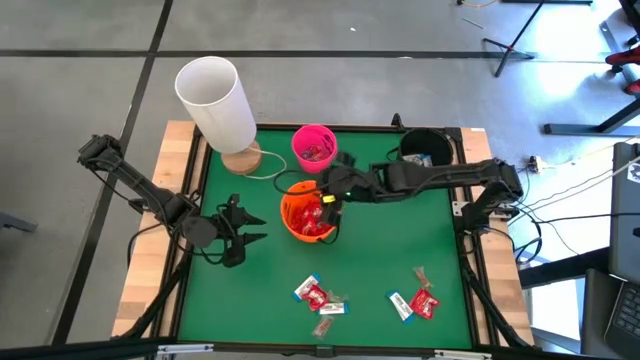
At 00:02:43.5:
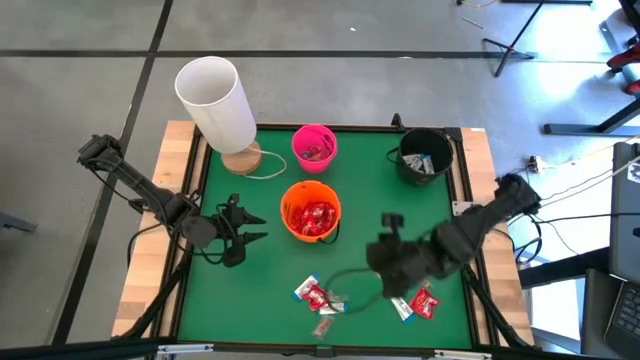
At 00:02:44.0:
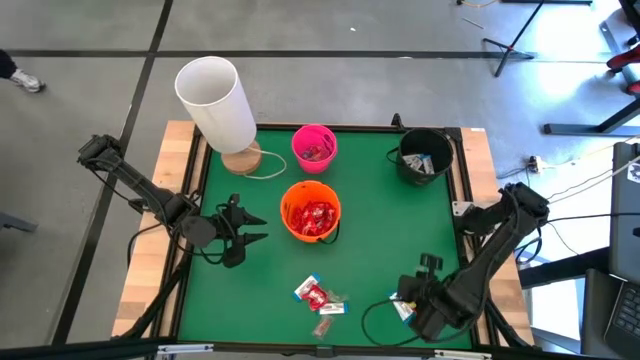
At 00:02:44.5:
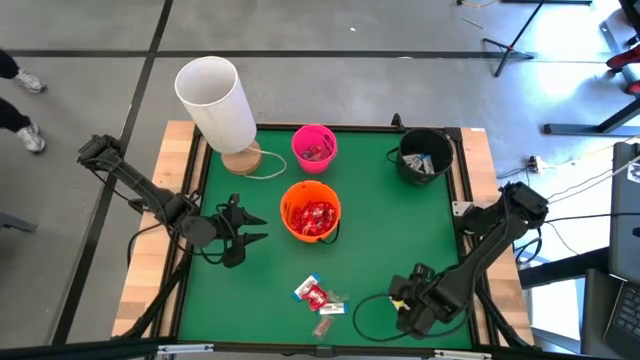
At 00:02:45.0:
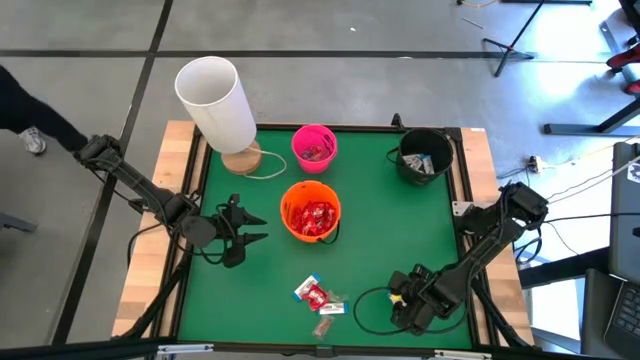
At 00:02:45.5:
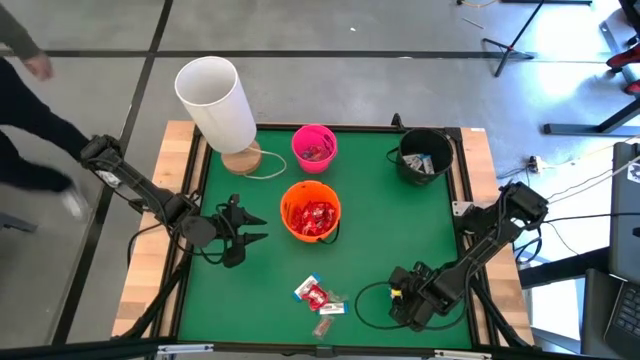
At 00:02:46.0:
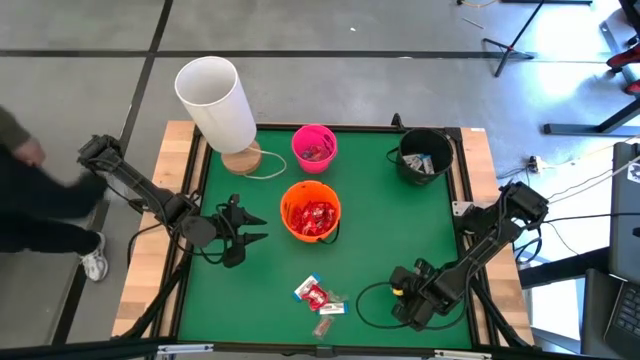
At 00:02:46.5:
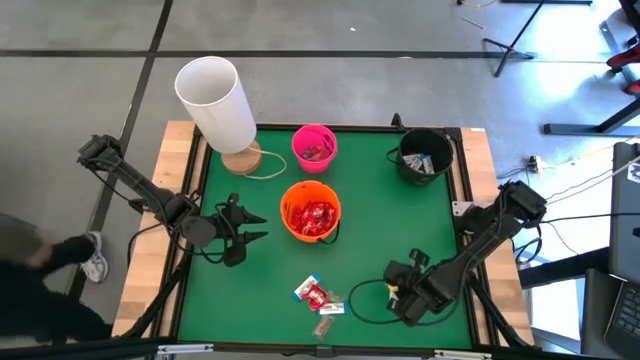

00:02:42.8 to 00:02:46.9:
Task: Sort candy
Put the white candy into the black bucket

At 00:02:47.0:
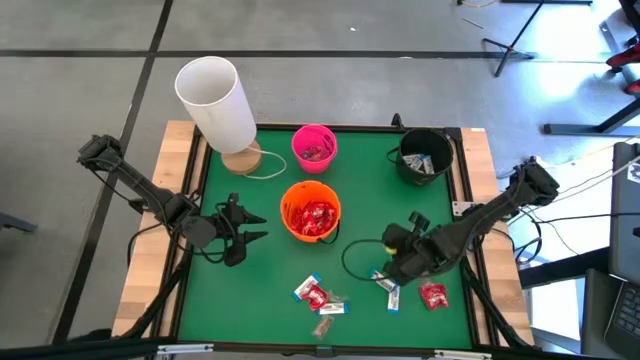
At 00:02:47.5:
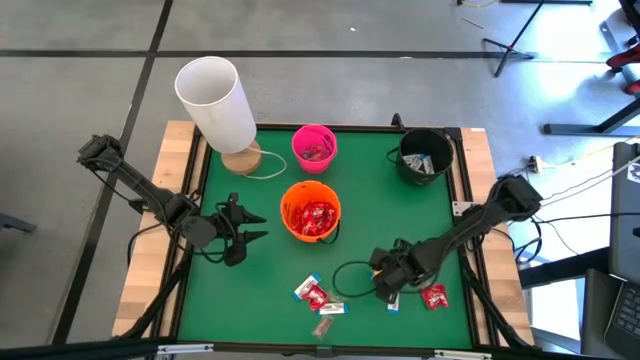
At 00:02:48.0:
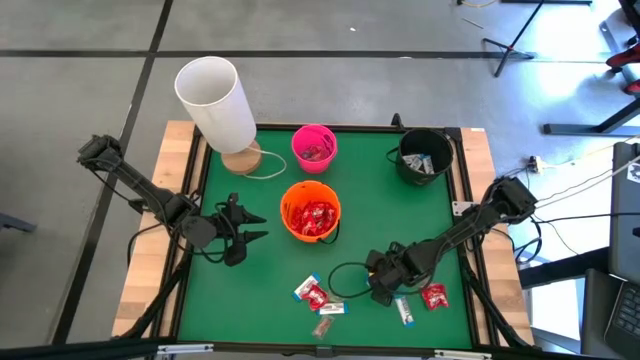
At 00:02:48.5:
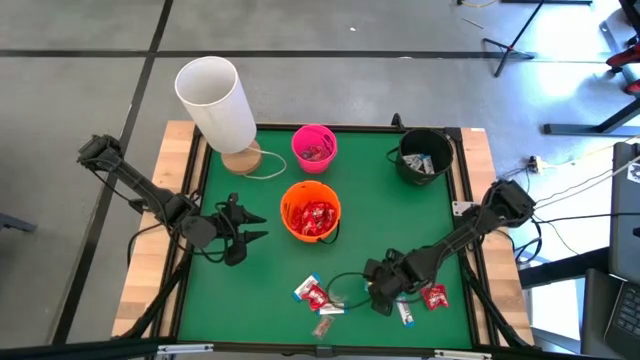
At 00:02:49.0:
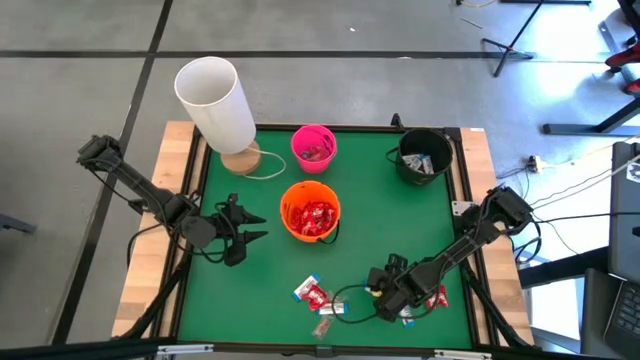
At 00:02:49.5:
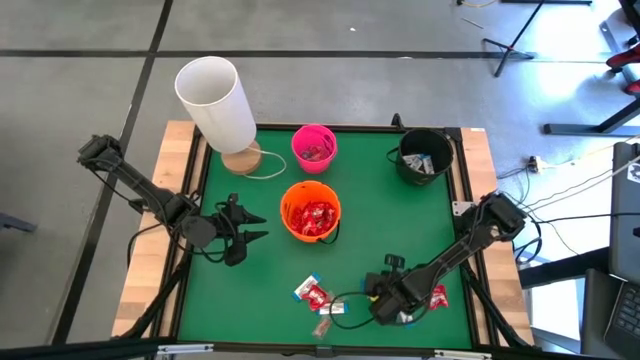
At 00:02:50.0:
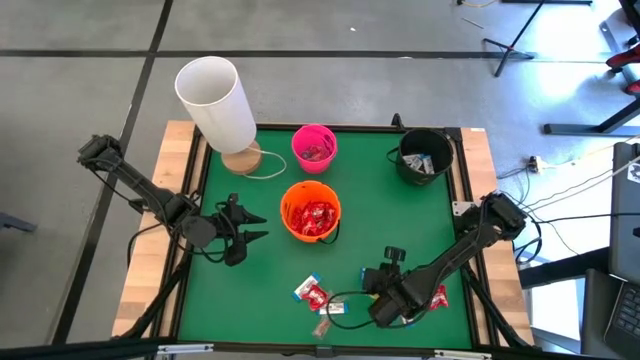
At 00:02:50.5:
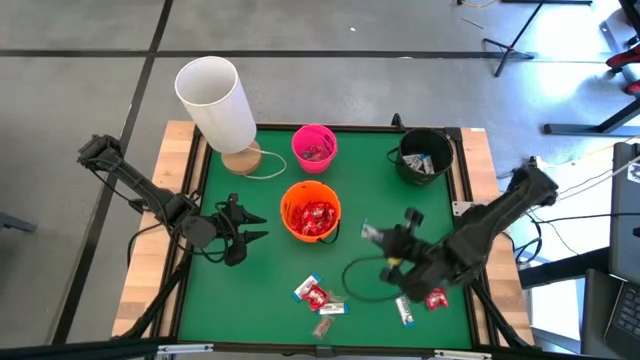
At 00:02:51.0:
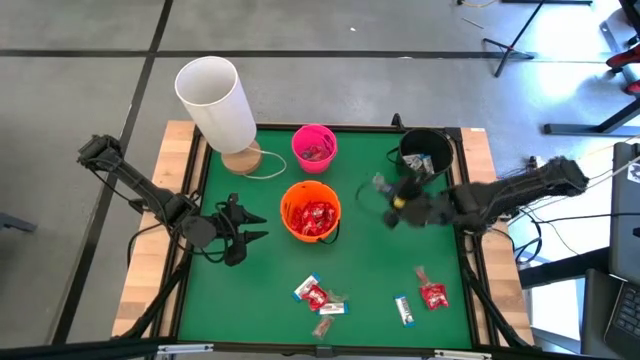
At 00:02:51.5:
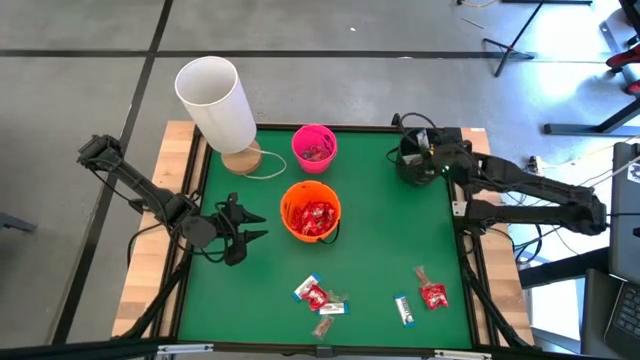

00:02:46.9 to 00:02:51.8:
Put the white candy into the black bucket

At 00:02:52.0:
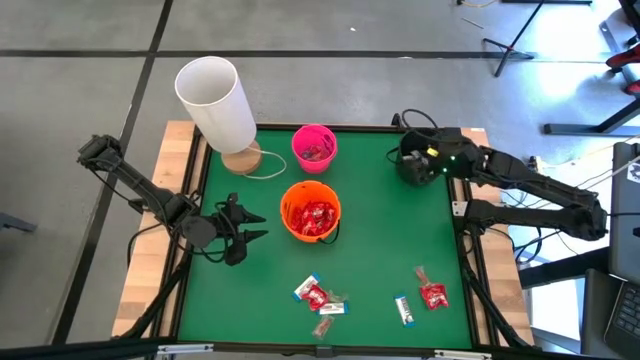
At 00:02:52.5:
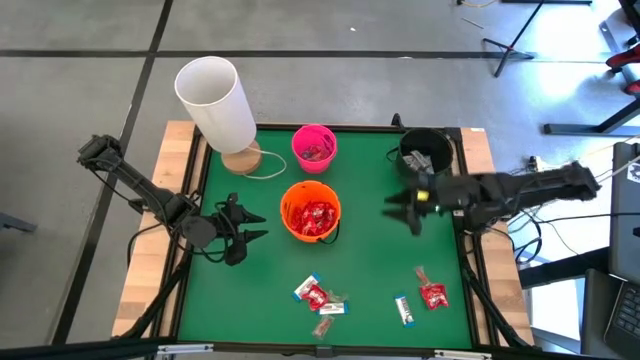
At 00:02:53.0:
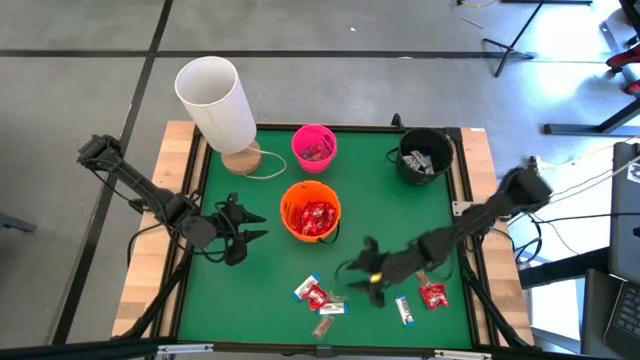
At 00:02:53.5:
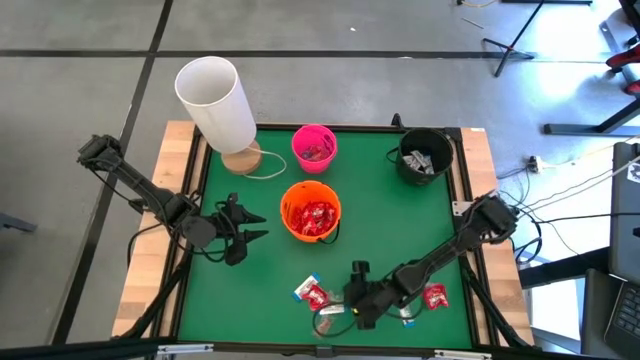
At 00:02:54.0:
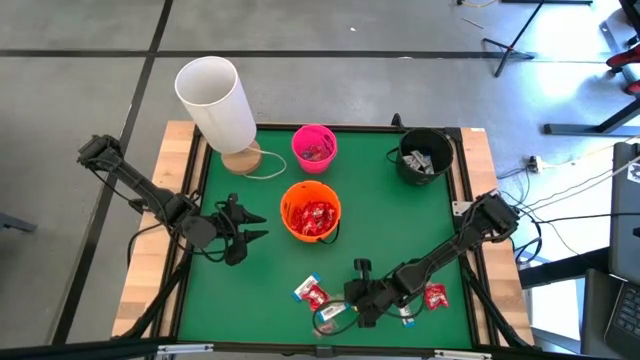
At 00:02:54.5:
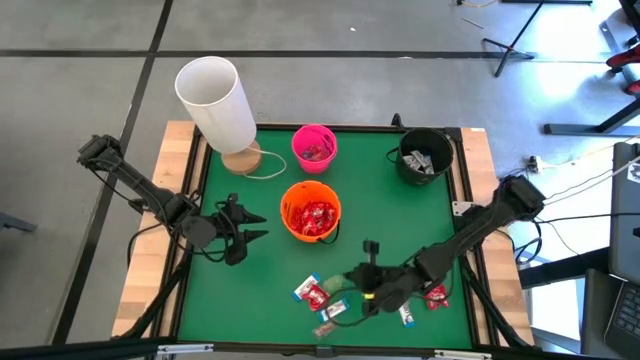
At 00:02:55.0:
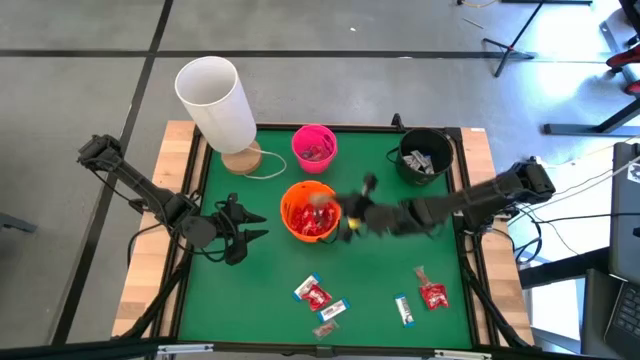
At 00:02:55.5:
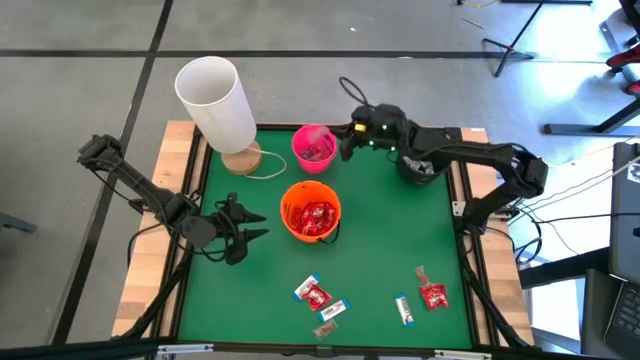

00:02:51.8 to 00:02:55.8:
Put the green candy into the pink bucket

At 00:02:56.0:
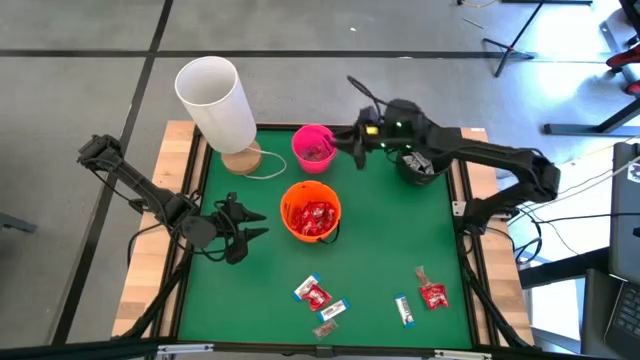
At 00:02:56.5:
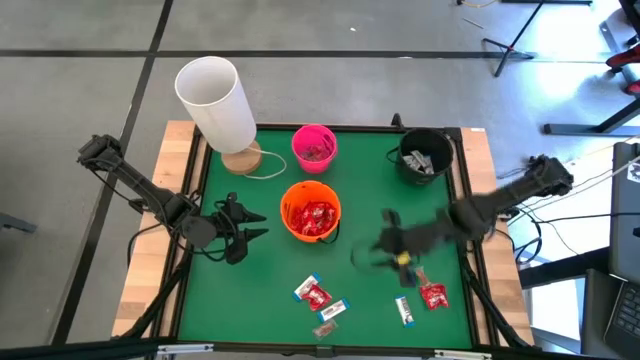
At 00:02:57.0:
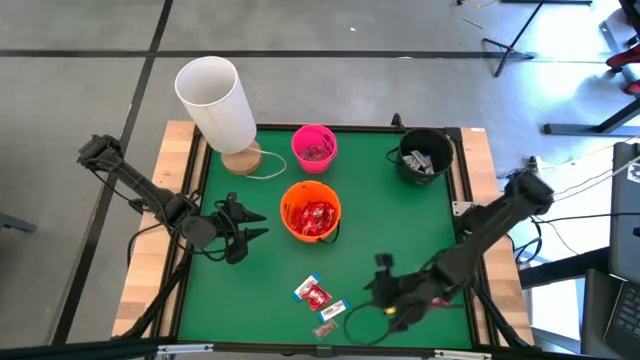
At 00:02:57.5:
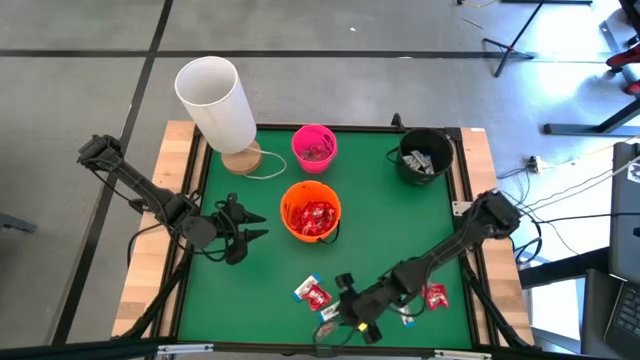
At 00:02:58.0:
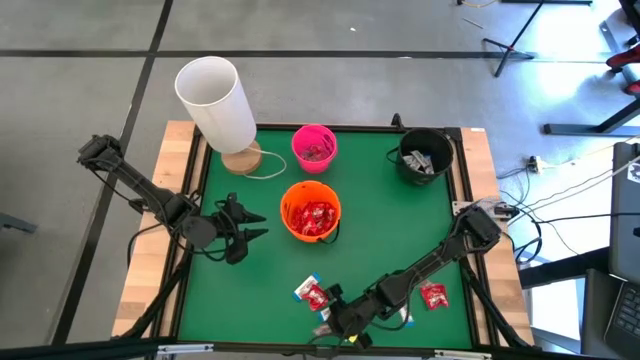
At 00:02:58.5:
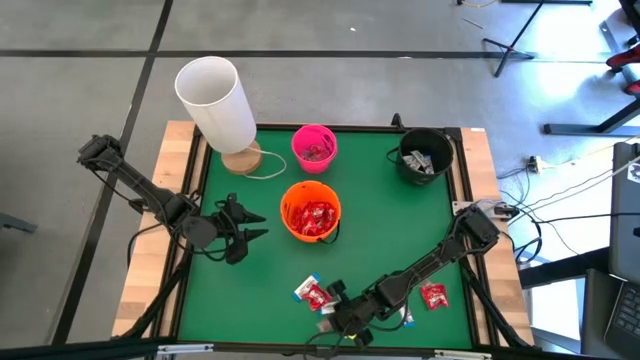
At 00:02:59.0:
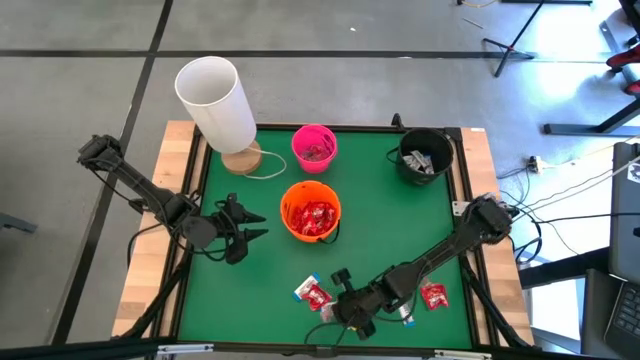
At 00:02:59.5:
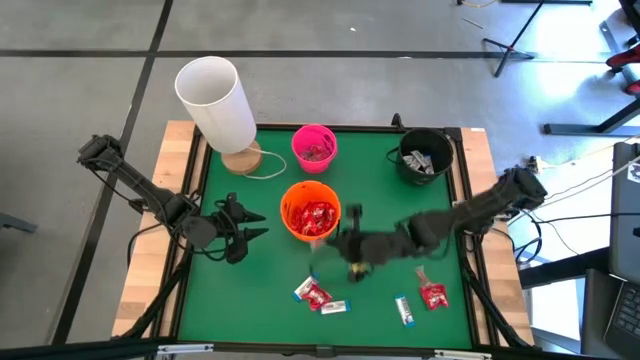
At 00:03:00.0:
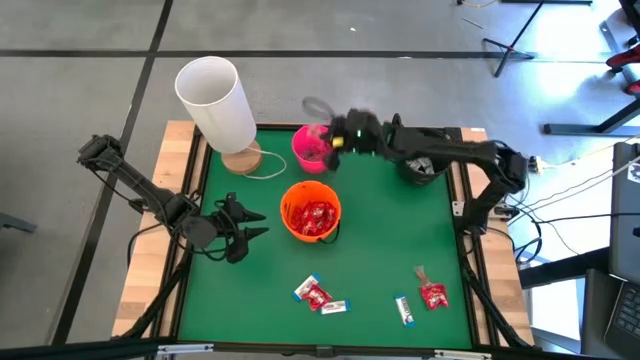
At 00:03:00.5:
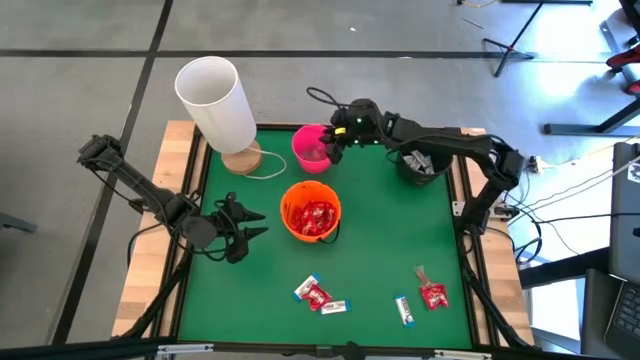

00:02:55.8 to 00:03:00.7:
Put the orange candy into the pink bucket

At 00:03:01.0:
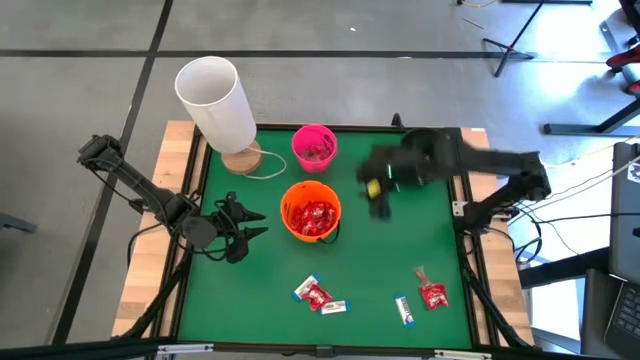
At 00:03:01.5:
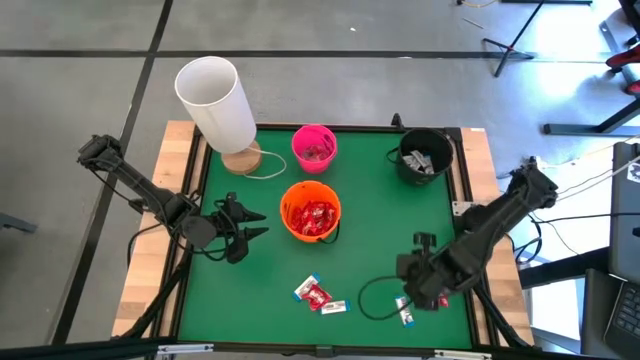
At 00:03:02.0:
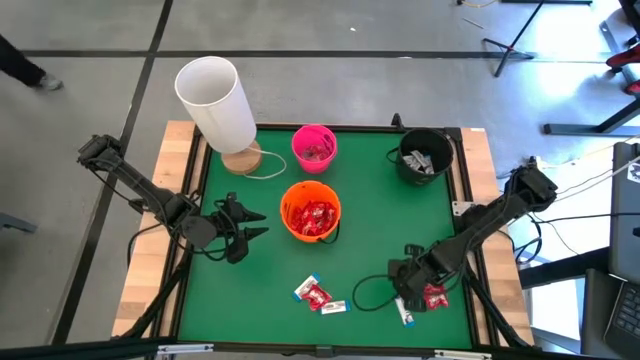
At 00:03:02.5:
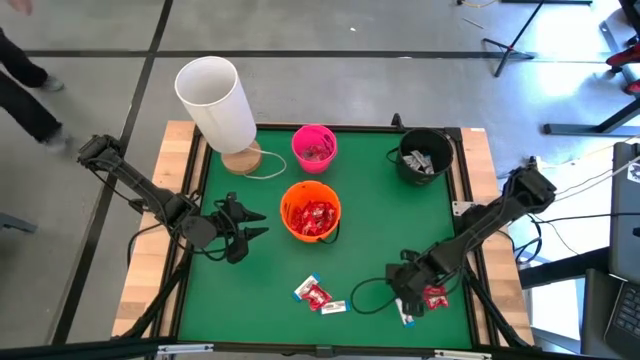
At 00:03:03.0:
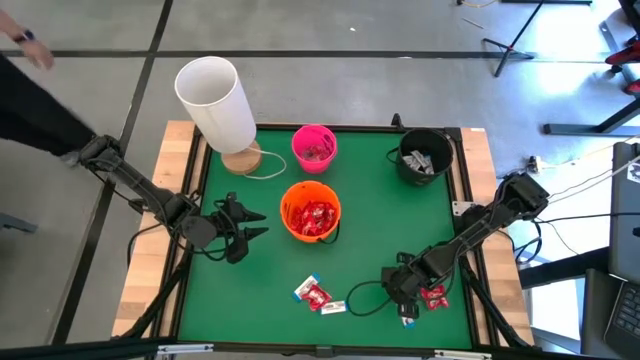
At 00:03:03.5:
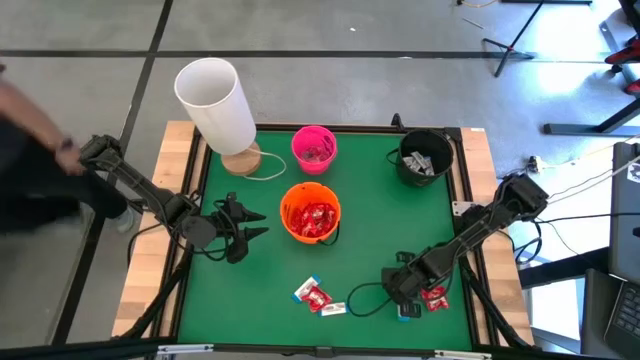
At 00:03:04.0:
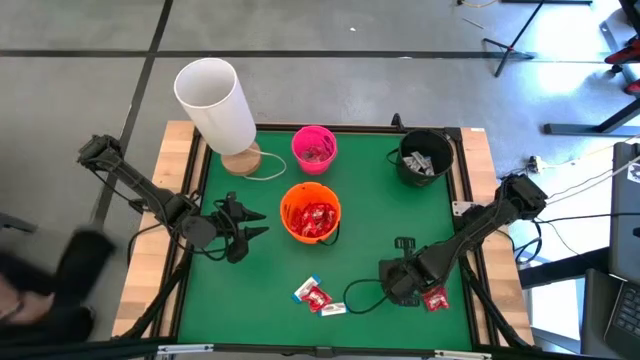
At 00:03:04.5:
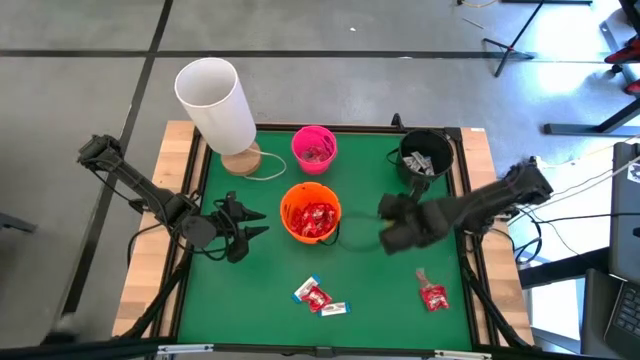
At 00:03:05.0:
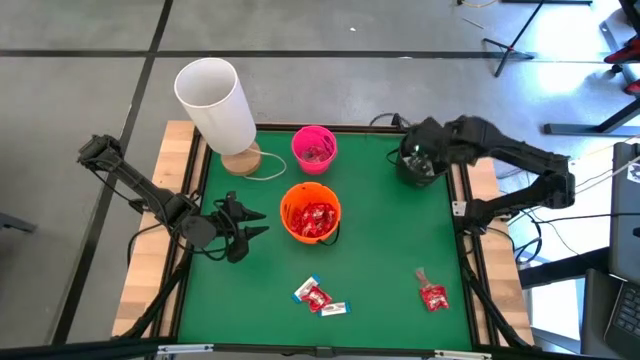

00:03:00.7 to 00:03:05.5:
Put the white candy into the black bucket
